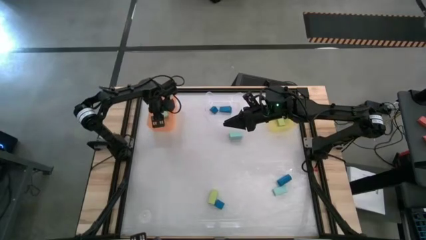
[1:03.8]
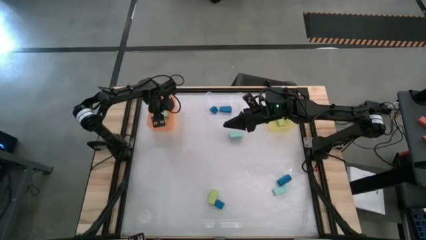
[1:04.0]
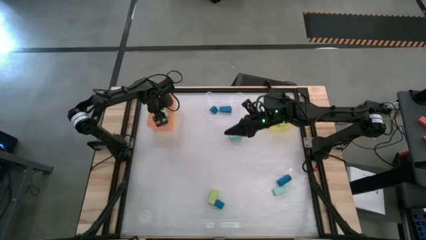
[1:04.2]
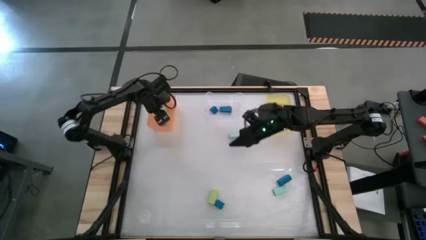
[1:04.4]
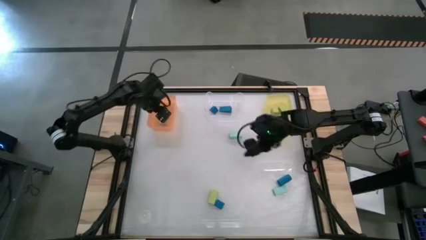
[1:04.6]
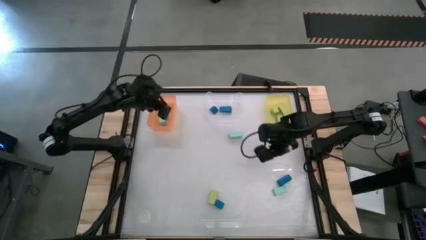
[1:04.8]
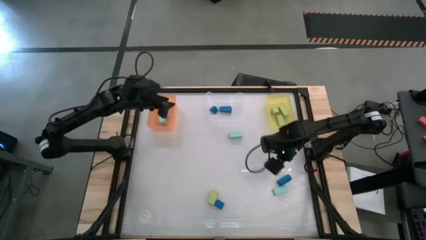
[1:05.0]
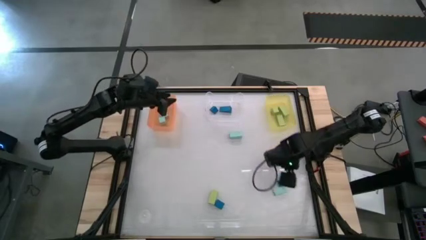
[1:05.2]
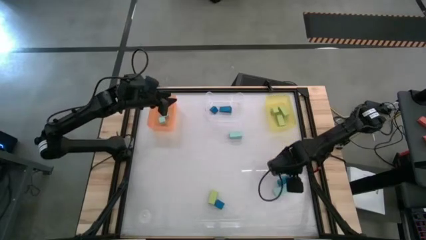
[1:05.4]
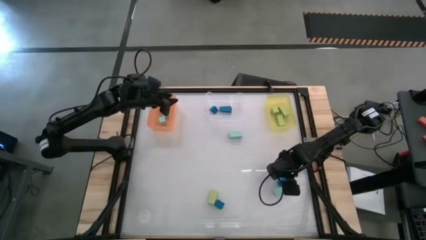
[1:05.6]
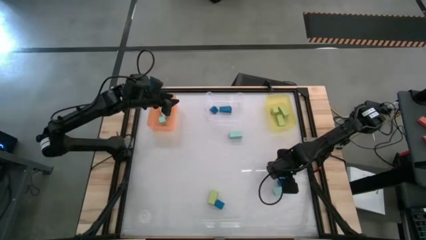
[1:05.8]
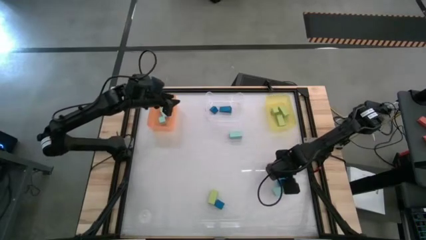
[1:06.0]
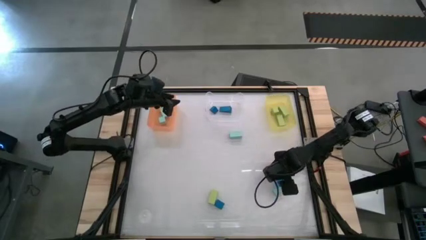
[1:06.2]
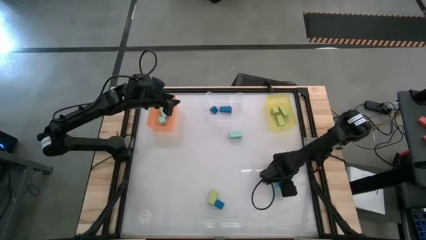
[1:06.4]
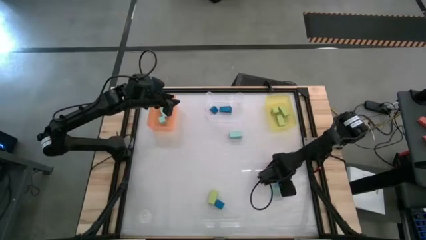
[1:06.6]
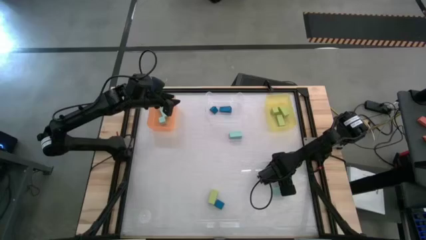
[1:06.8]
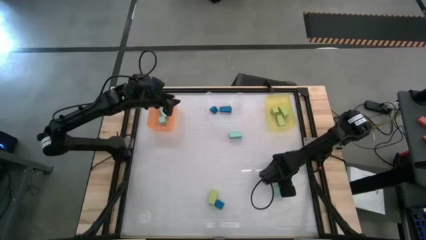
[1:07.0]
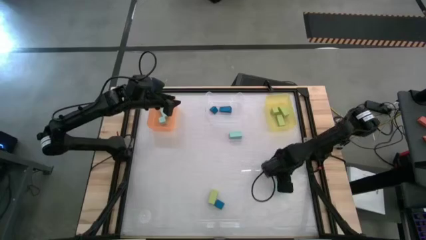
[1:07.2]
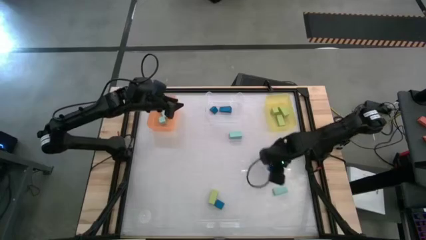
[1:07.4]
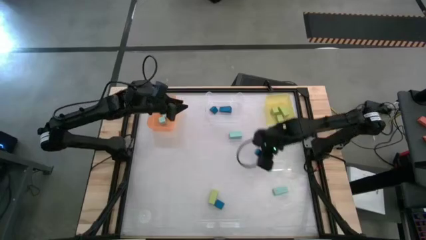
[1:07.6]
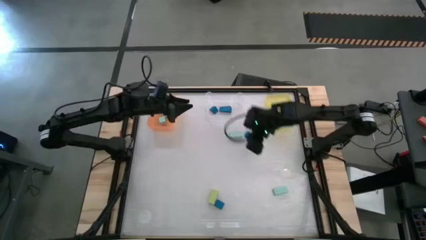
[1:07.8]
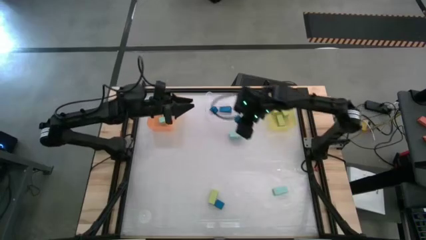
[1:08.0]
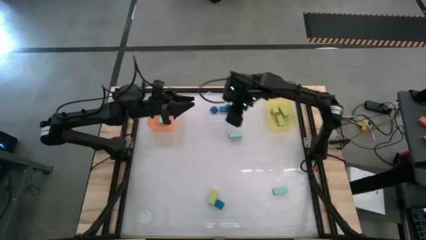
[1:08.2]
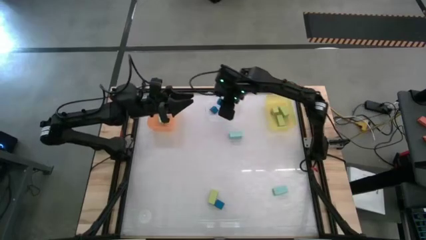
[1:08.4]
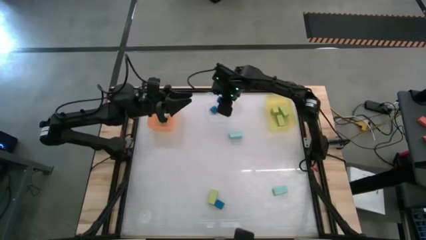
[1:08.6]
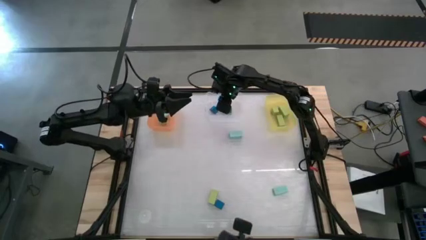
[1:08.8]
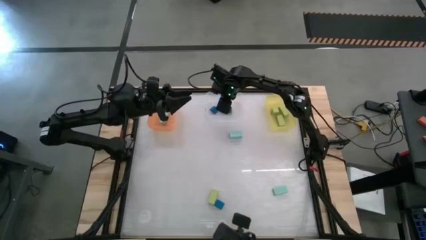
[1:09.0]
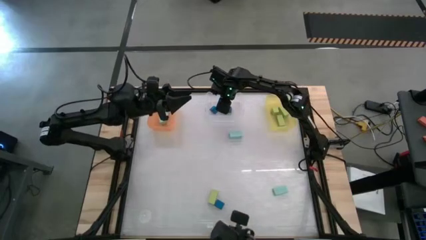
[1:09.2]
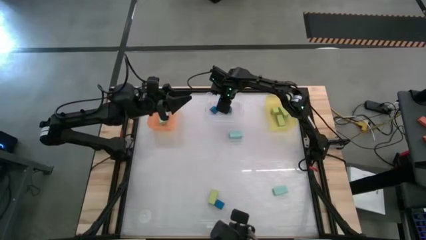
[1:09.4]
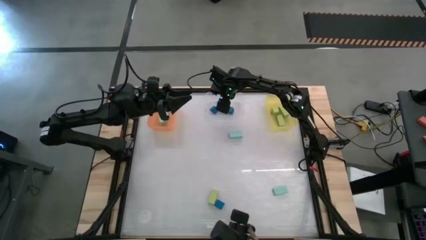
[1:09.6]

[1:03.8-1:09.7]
Task: Sort & place blocks by color
Put the blue cylinder block into the transparent bin

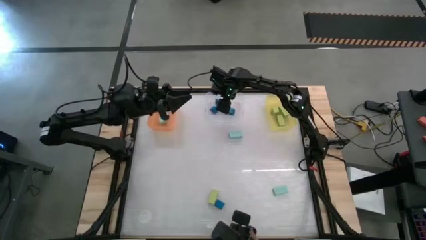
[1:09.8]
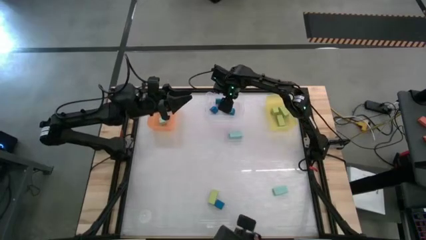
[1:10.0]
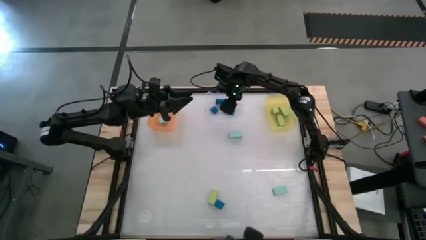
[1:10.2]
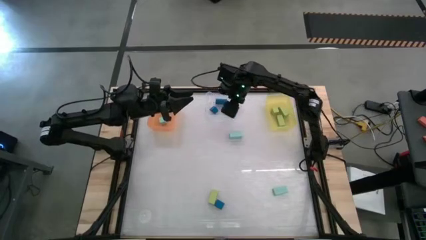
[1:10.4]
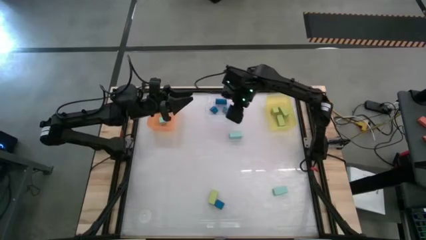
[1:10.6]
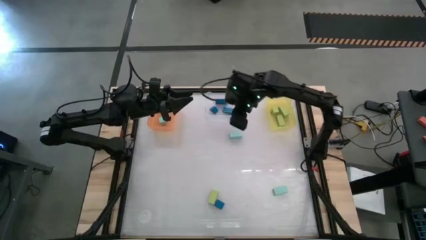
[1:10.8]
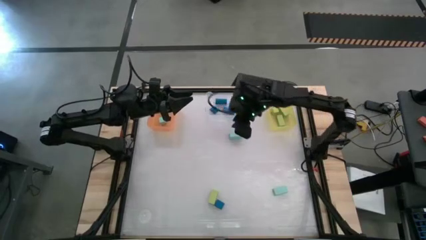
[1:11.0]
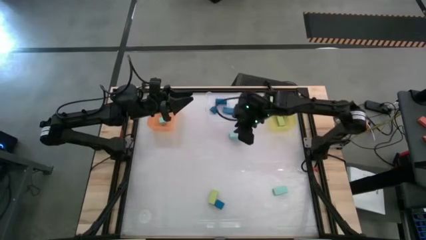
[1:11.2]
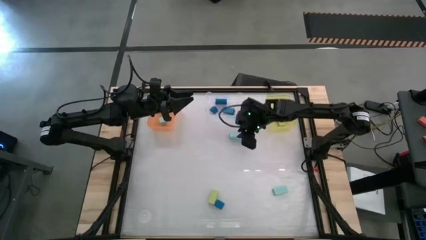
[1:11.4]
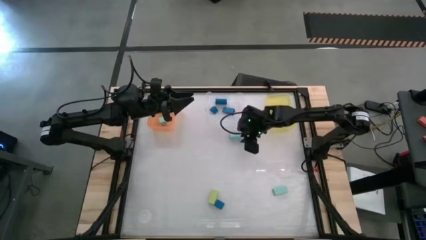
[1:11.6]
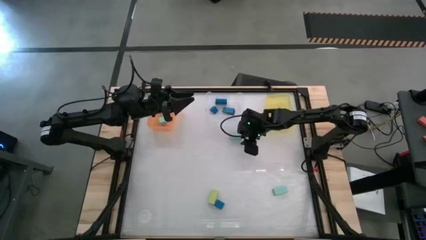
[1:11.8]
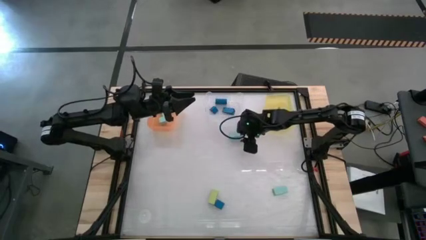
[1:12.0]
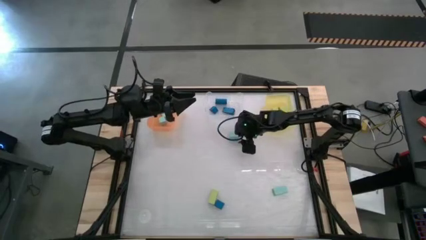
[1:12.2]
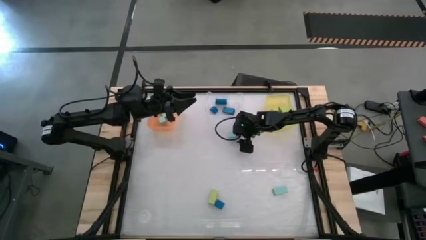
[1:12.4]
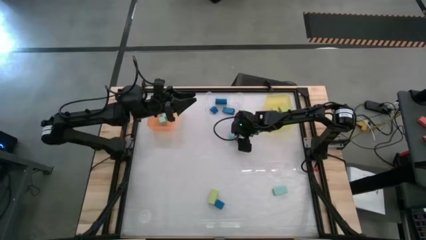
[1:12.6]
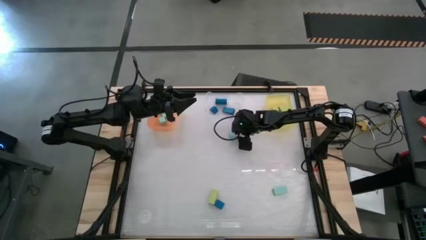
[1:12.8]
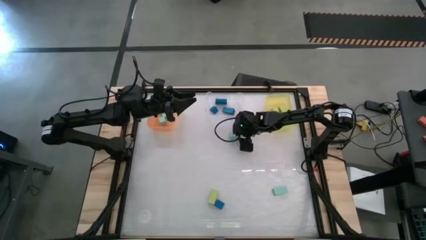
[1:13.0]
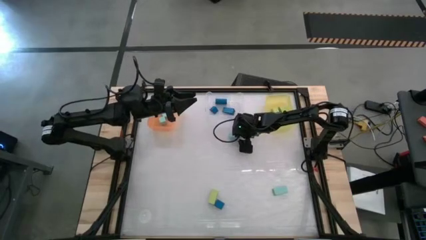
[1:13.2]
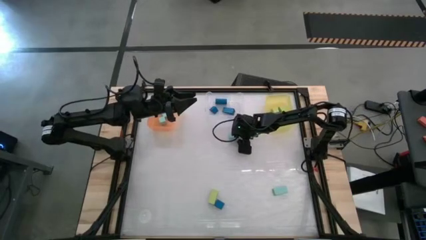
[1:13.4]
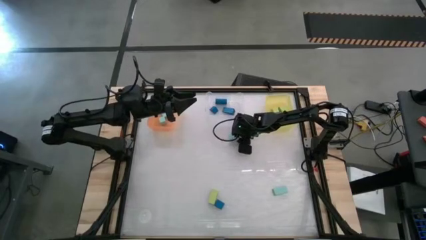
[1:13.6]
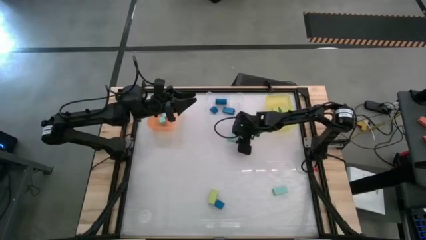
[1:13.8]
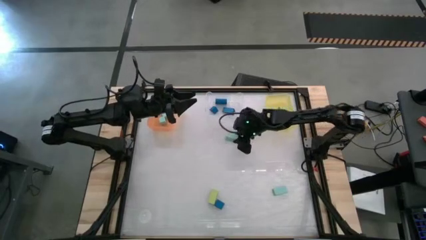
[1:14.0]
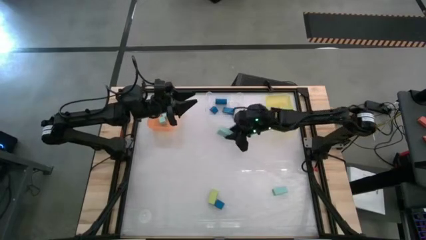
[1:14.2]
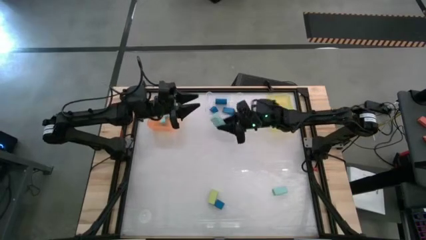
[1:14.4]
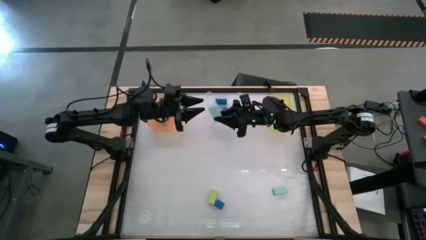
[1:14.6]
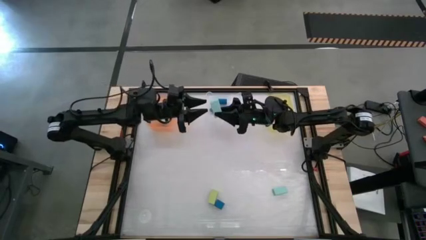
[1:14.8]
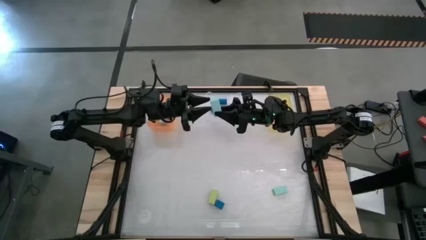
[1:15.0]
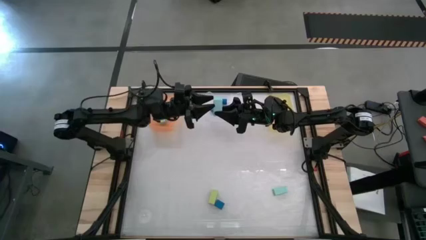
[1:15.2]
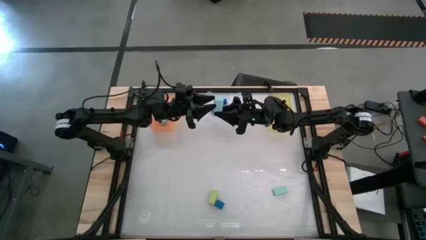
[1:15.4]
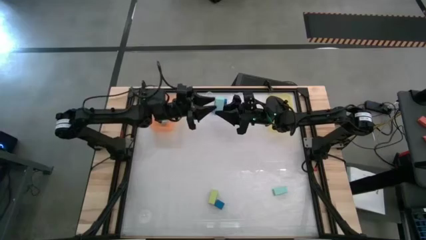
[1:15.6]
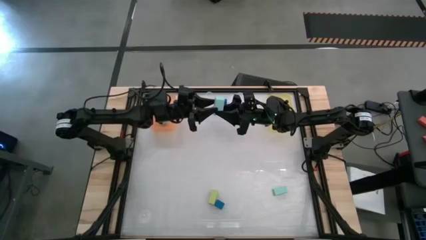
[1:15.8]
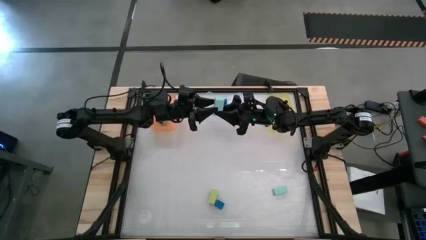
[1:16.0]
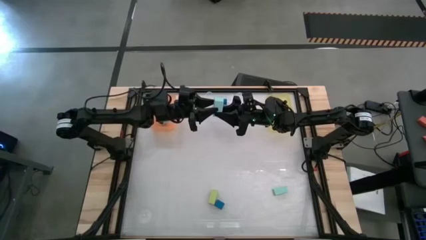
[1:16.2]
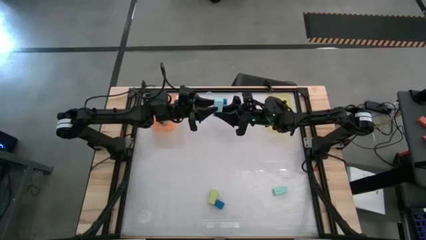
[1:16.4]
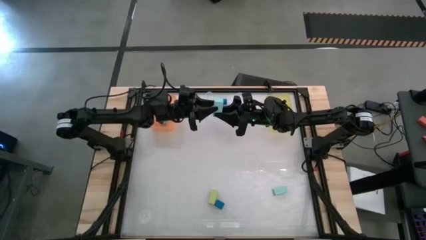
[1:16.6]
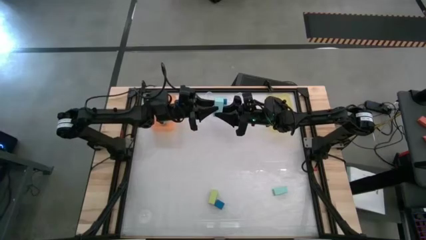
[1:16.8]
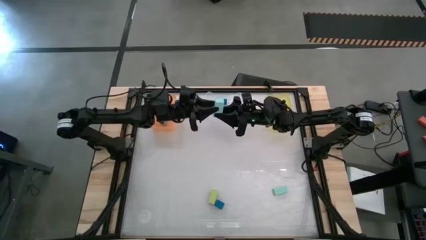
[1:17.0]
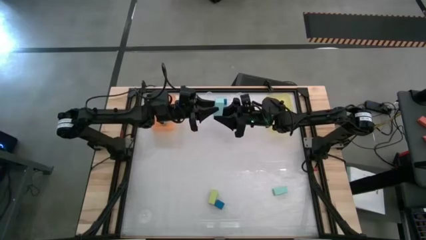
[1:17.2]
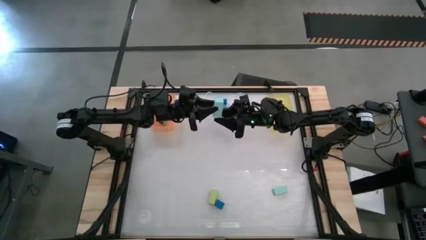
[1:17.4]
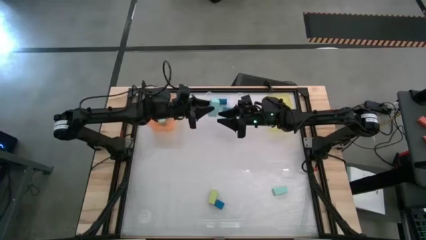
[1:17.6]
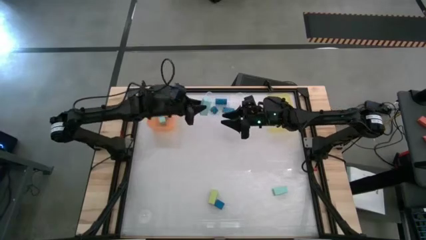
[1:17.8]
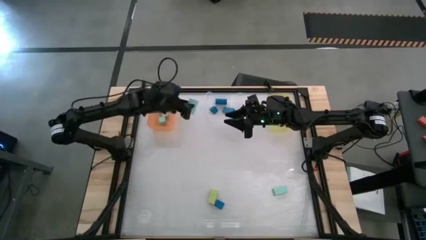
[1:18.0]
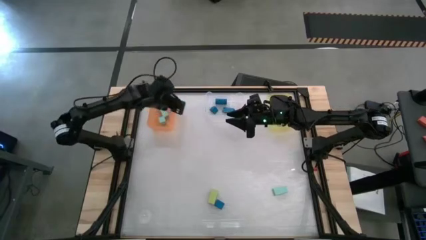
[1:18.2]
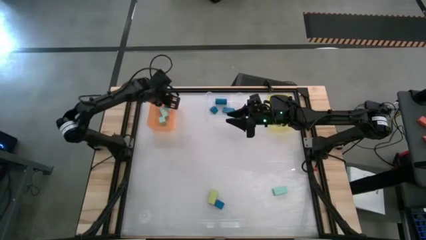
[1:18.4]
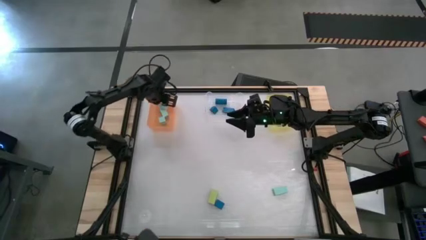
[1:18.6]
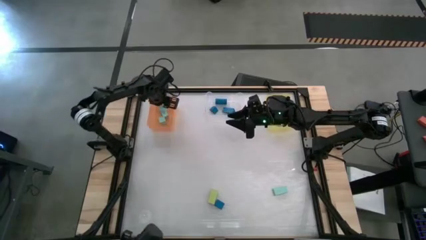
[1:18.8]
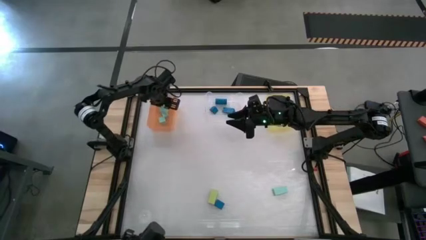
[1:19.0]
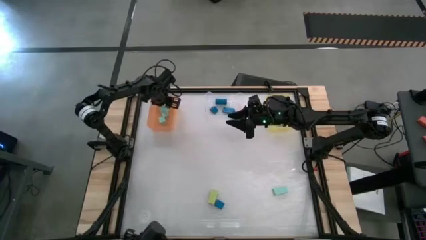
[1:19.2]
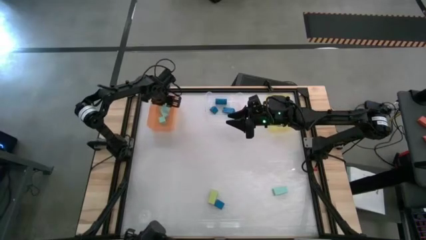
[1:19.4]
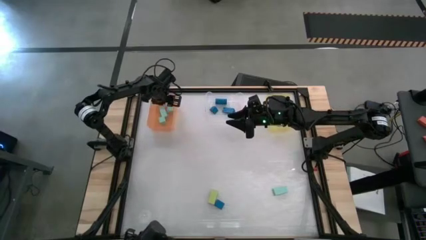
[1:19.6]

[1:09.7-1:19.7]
Put the top light blue rectangle block into the orange bin

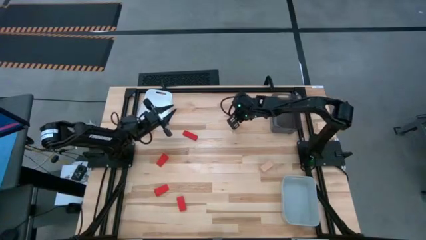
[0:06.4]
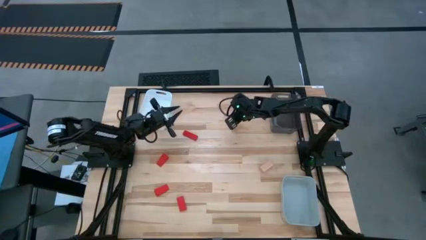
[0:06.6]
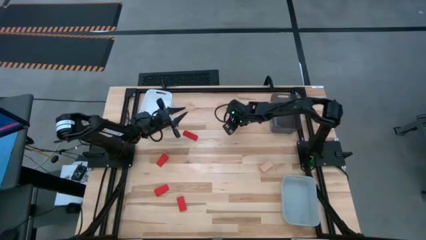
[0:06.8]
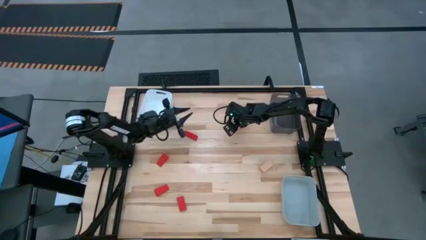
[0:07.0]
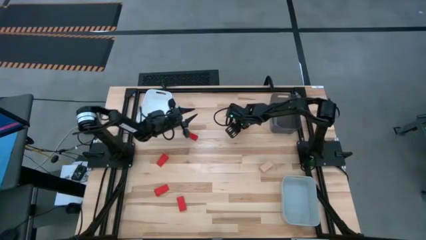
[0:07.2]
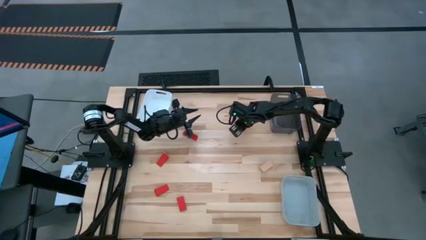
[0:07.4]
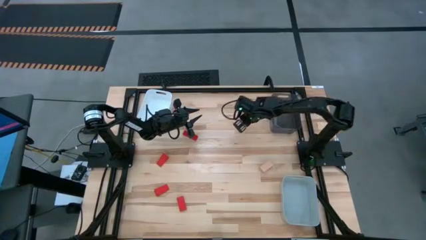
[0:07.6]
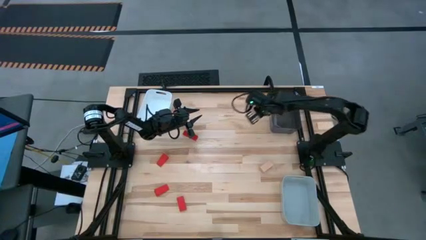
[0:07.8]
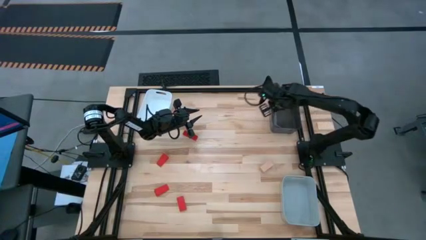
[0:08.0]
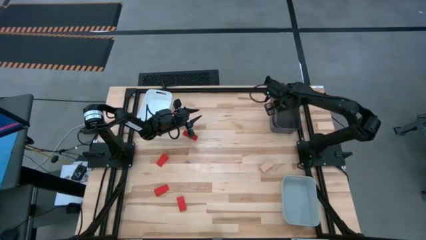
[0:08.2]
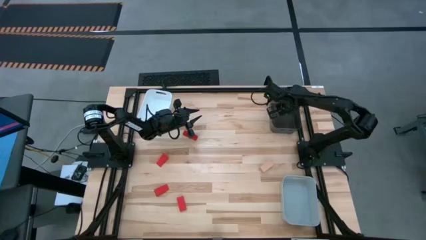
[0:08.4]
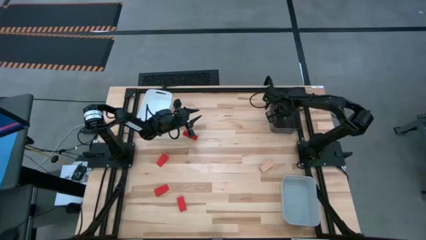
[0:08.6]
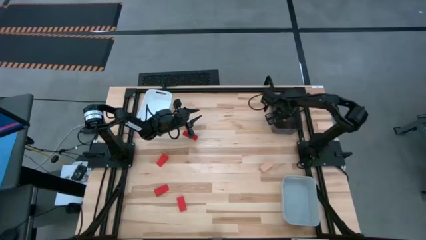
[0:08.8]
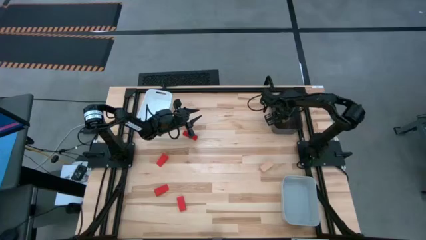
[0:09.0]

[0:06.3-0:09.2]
Task: Sort & place blocks by color
Put the brown block into the black bin
